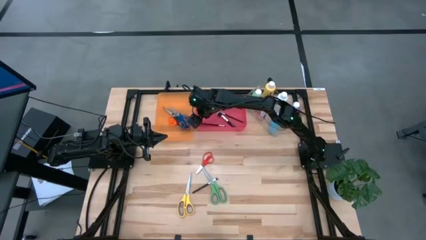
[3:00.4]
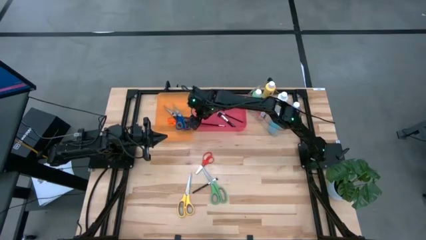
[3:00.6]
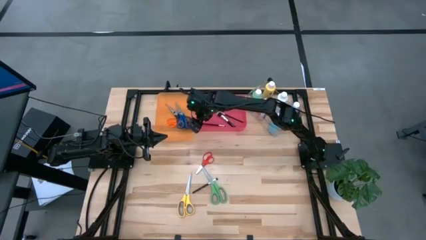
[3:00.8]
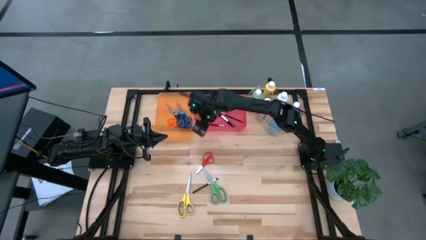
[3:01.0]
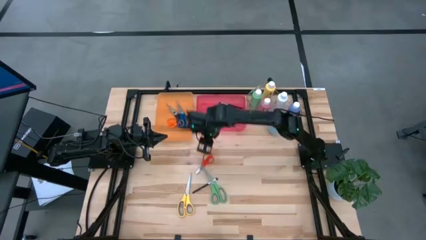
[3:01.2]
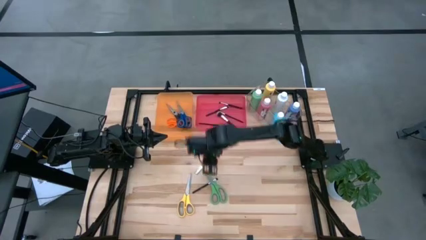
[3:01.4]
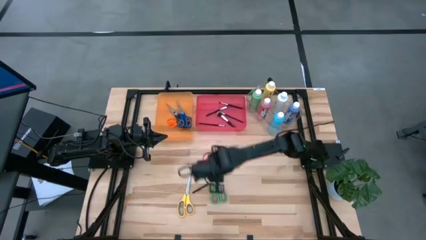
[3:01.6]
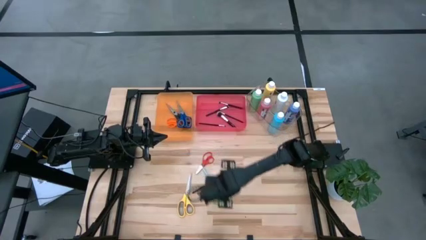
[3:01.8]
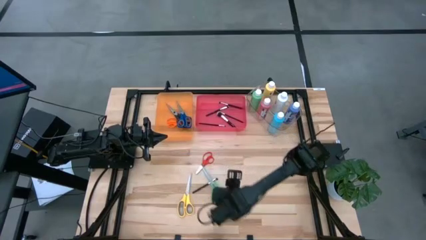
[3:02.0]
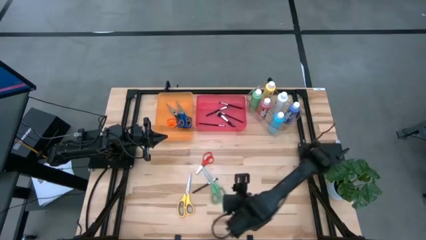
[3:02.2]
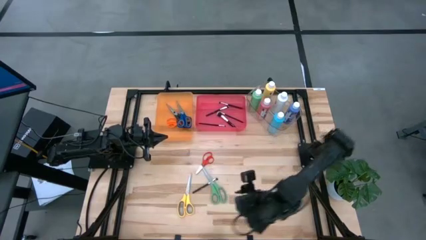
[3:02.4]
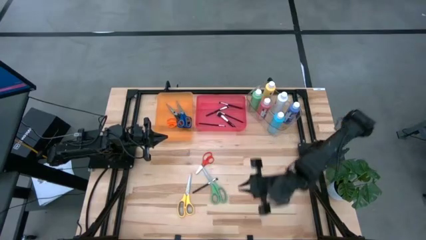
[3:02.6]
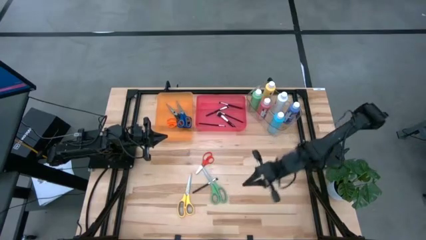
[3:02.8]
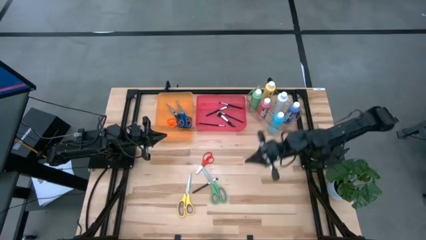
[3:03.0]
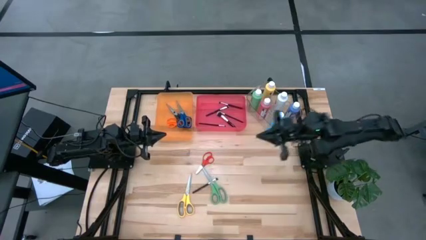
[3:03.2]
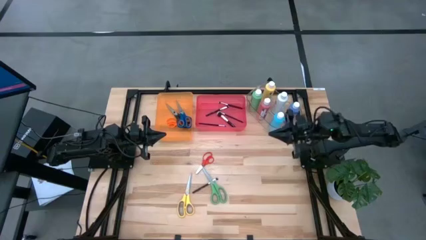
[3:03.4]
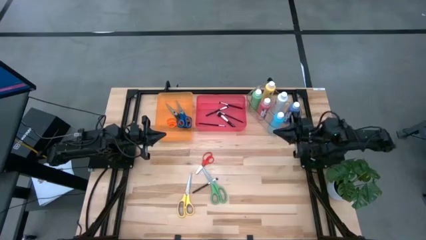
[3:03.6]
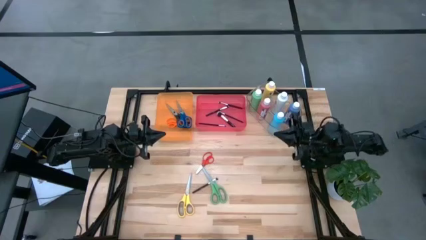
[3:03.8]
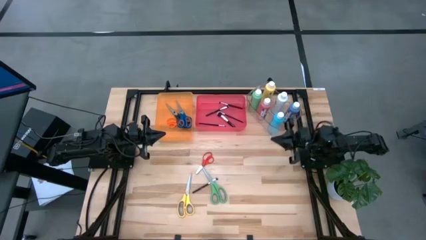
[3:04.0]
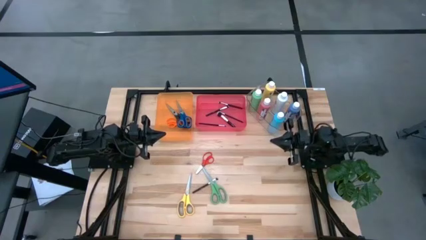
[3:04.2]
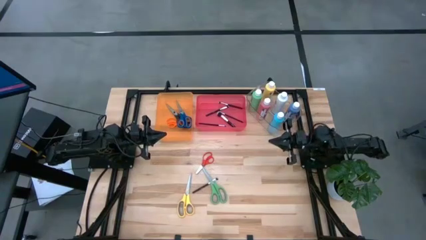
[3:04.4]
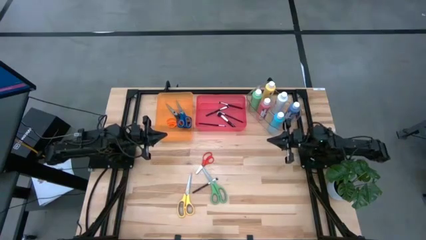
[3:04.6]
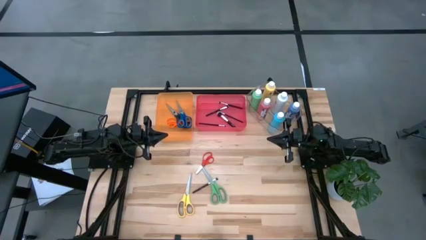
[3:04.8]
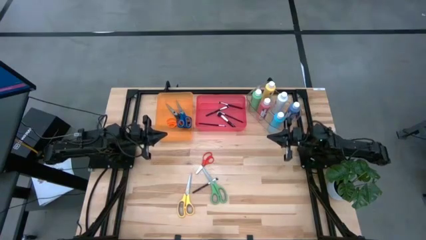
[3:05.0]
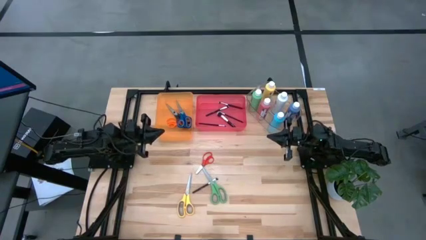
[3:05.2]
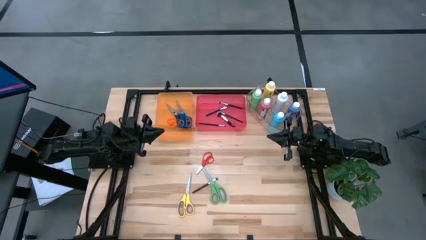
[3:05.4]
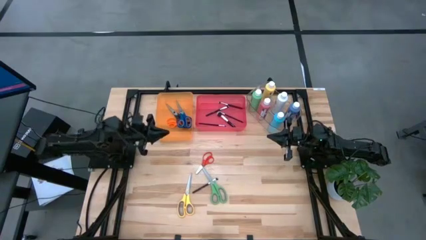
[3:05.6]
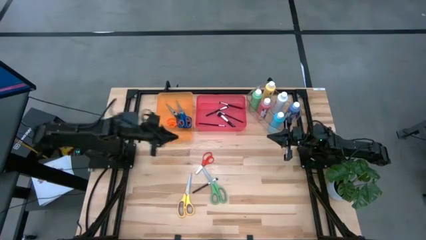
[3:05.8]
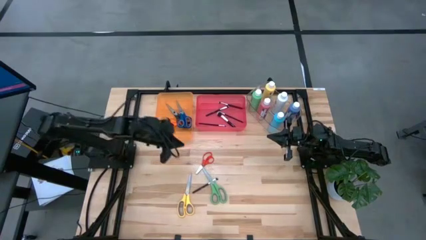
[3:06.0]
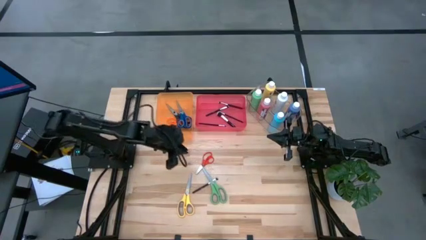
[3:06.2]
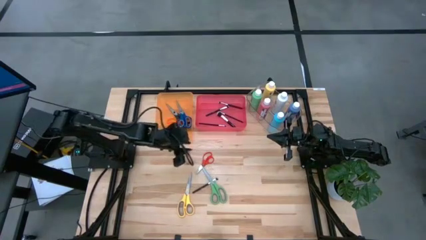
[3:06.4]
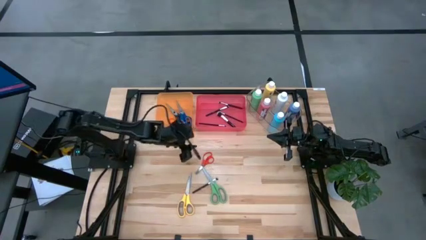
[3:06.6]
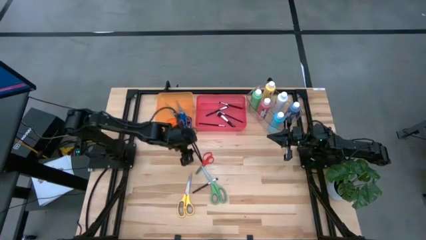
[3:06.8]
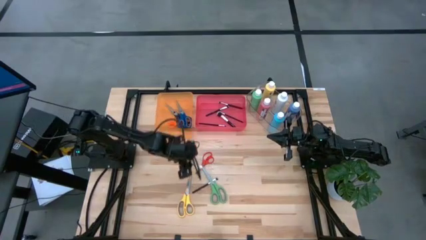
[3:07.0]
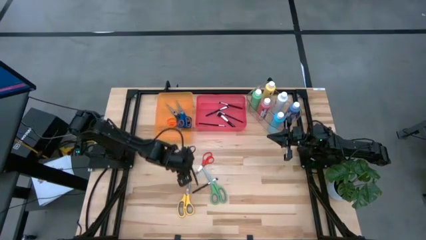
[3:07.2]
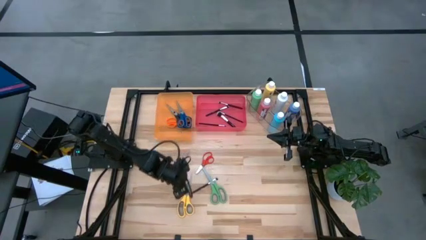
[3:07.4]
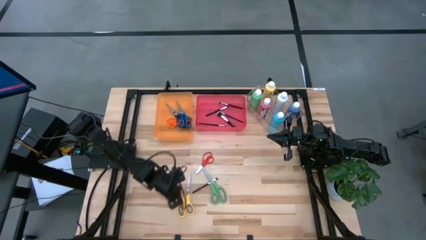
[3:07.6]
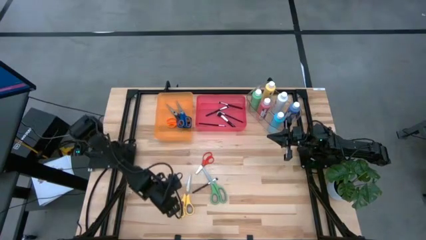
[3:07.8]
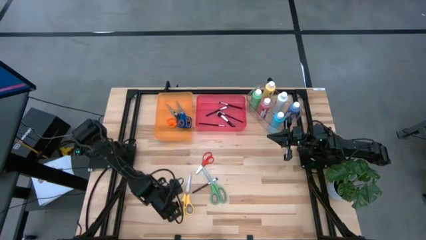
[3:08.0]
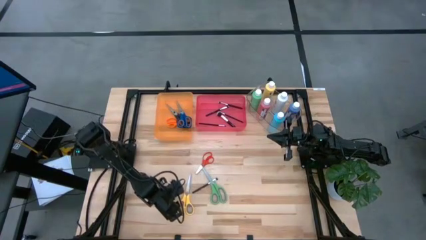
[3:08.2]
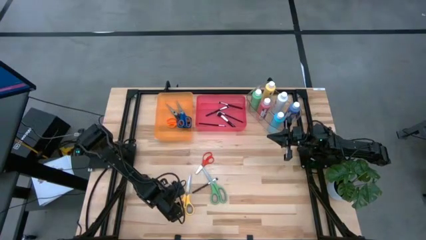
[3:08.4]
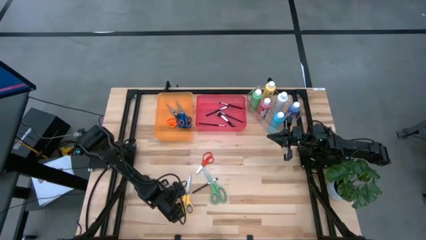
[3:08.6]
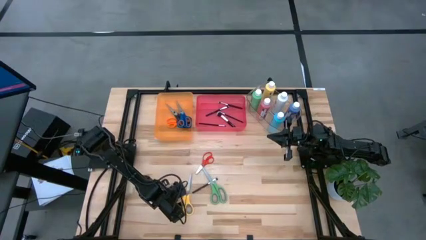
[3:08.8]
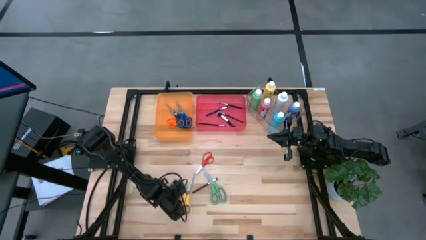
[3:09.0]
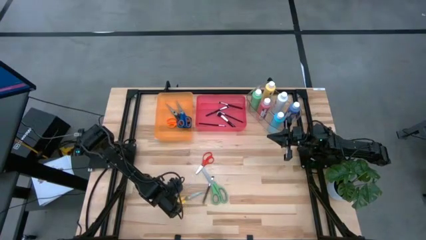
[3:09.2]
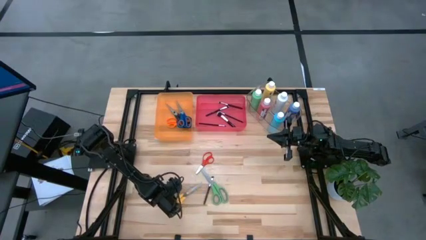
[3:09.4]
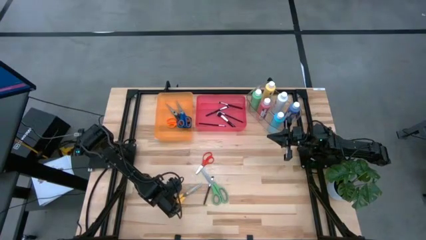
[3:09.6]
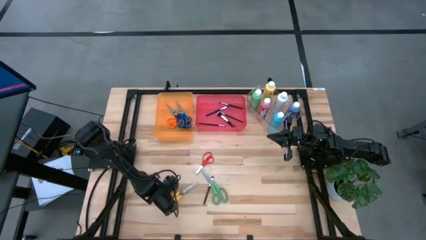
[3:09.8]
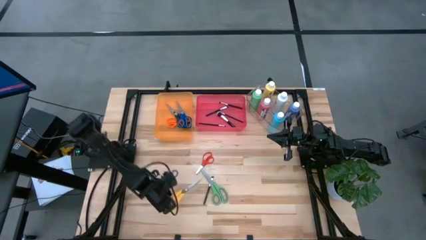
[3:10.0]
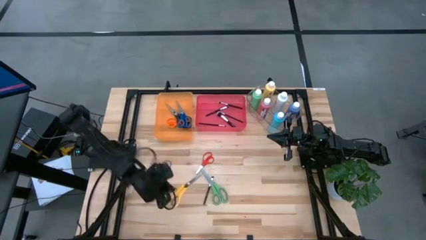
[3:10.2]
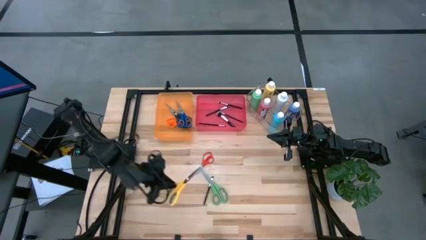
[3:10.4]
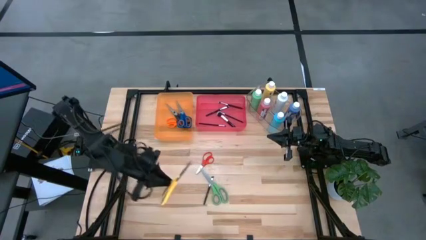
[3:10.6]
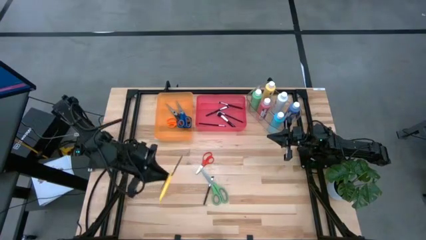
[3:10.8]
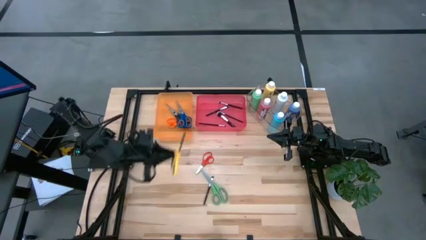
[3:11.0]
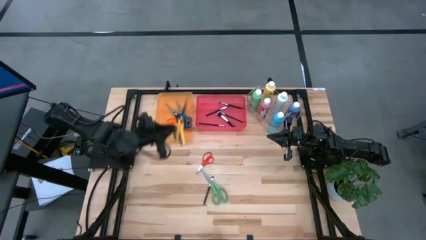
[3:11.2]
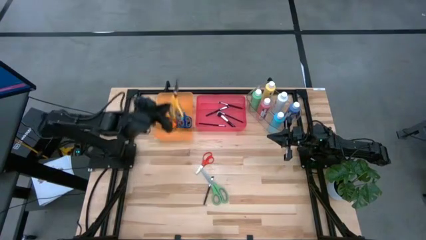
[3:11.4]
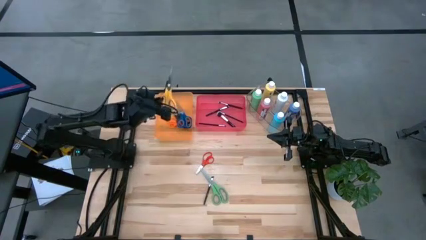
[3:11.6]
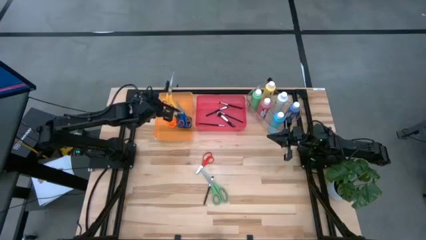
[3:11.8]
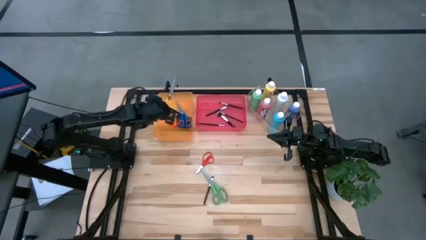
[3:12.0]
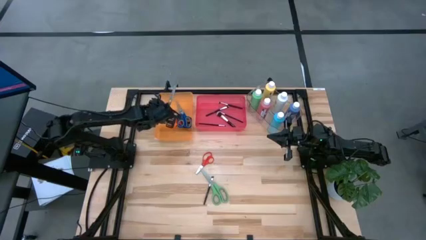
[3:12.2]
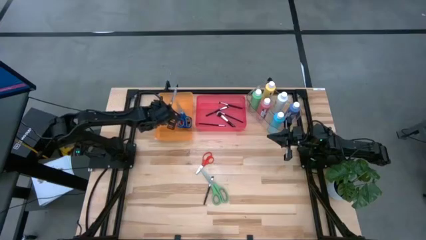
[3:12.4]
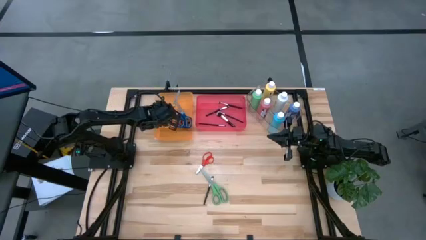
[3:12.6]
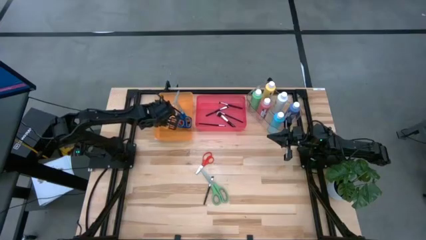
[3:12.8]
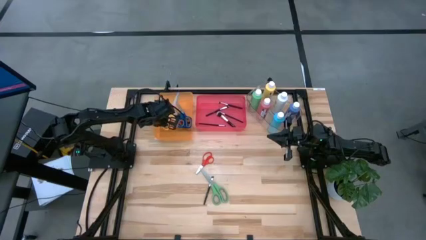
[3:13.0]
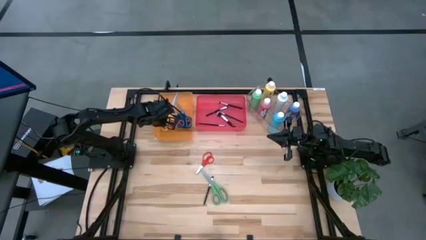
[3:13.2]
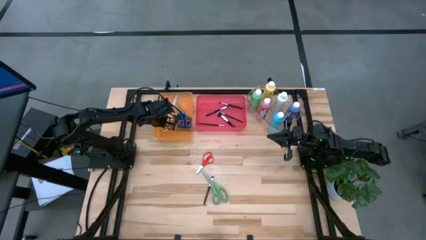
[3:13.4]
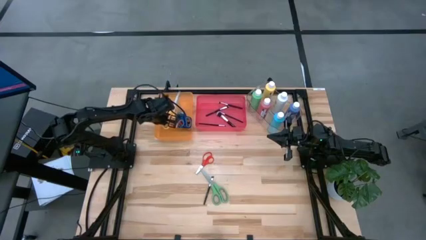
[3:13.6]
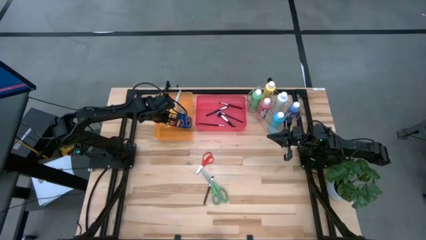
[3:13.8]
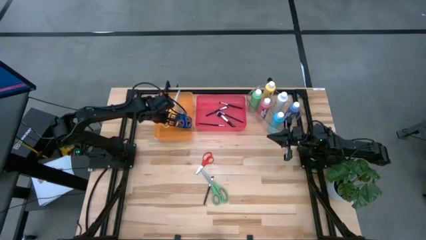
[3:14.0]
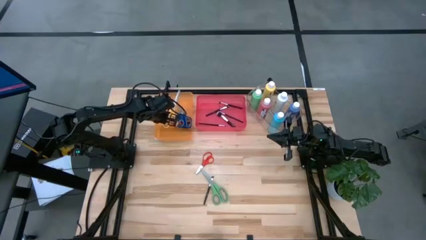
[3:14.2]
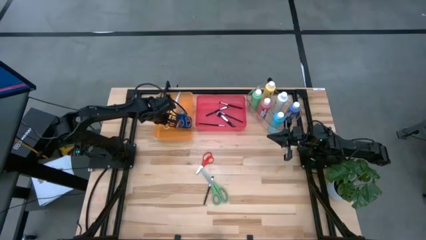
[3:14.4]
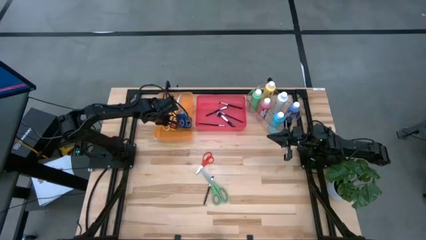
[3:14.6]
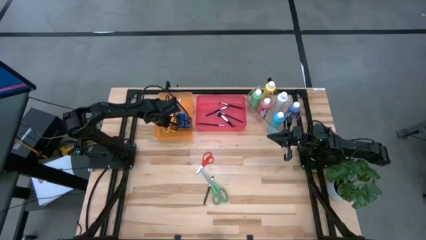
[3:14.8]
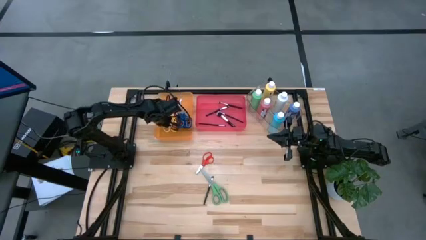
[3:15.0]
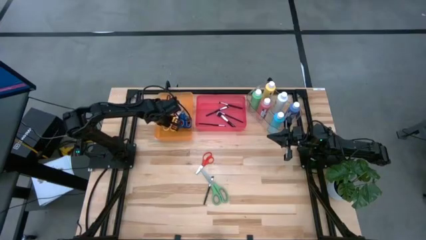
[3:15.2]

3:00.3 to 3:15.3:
Task: Pick & Place Paint Supplies
Put the yellow scissors into the orange bin

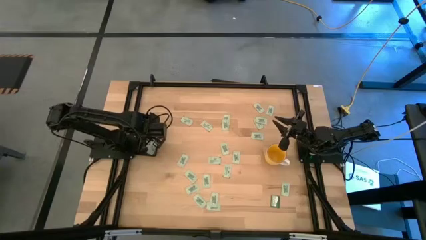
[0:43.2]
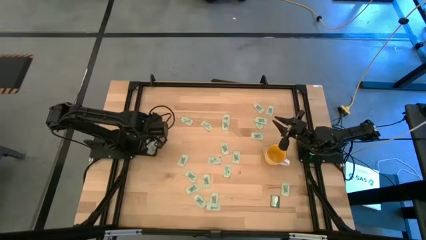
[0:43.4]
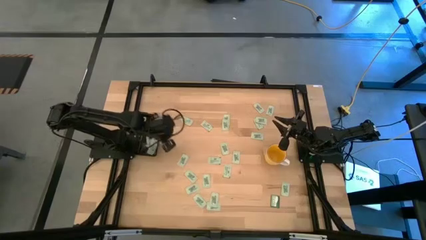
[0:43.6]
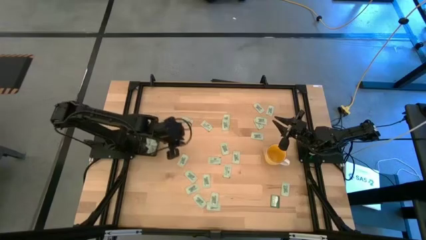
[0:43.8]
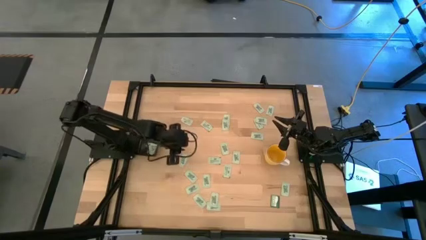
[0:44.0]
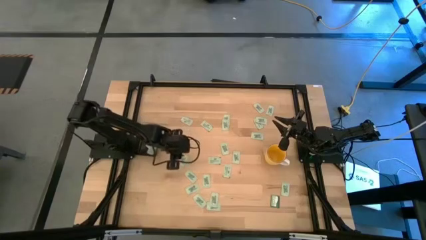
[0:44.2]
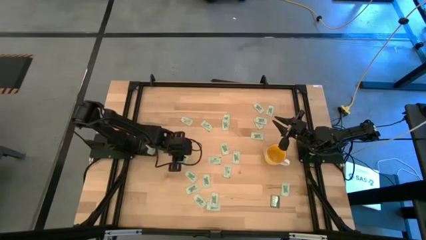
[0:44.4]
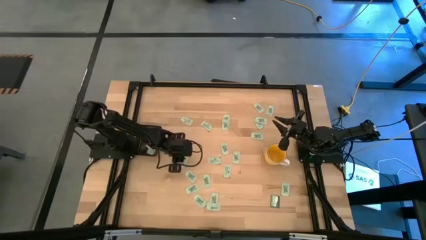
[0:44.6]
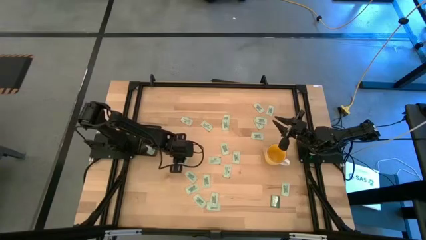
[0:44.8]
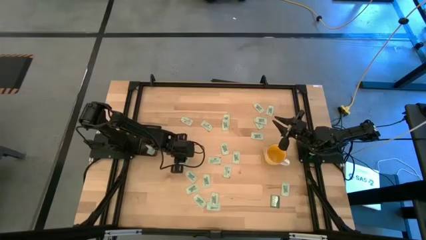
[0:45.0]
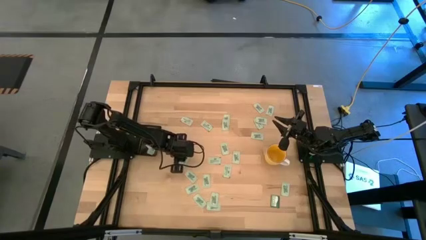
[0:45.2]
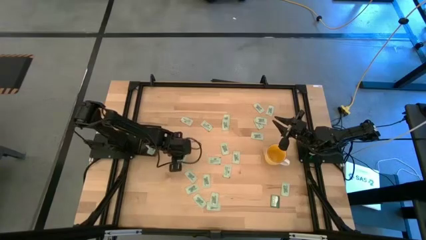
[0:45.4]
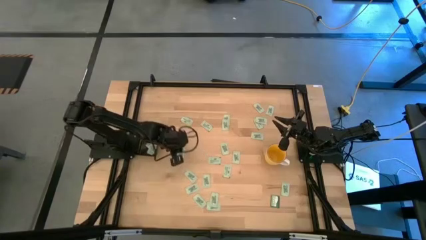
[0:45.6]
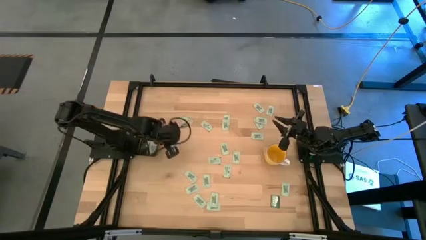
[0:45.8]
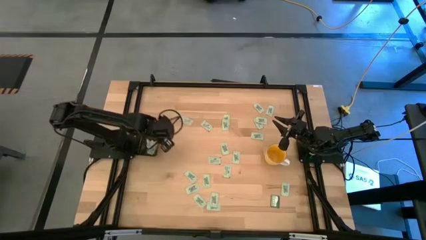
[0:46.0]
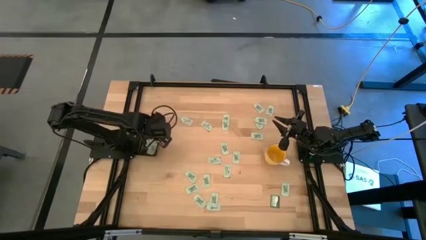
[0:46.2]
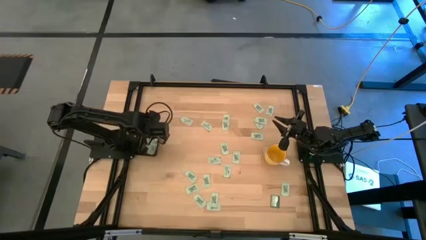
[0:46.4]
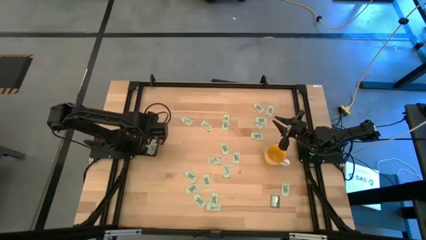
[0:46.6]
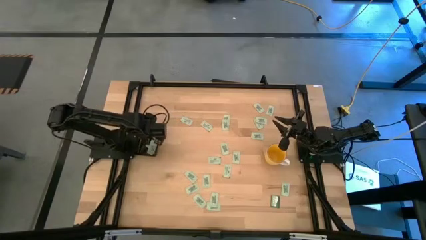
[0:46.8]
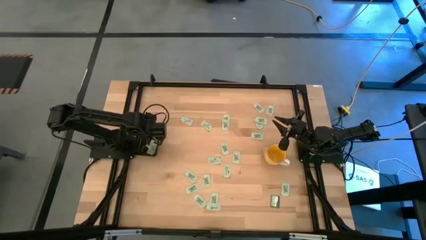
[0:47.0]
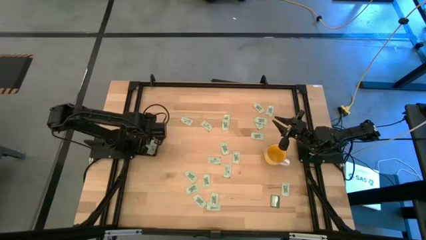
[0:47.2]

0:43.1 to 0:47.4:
Task: Pick and place Stevia / Truvia into bins
Put the stevia packet into the black bin
